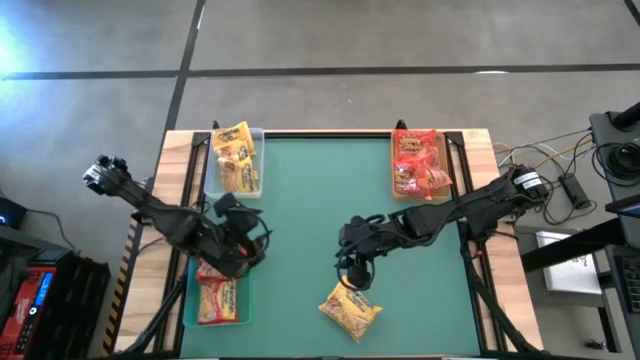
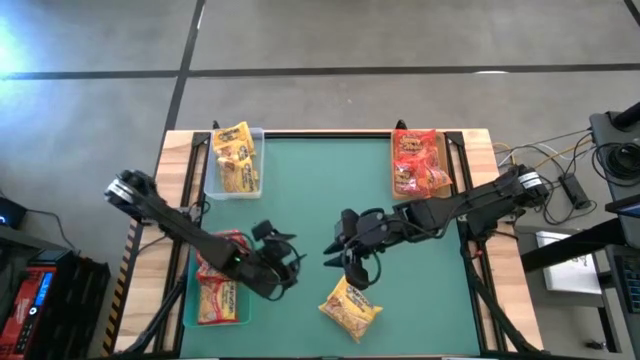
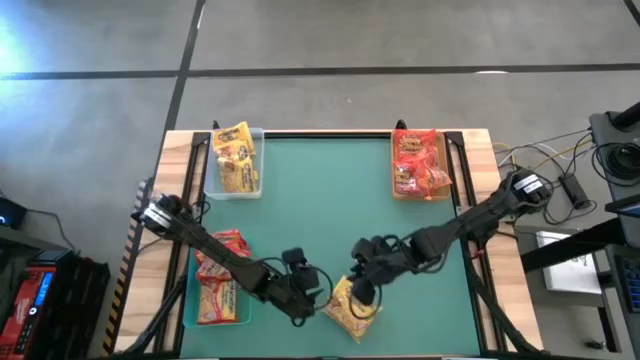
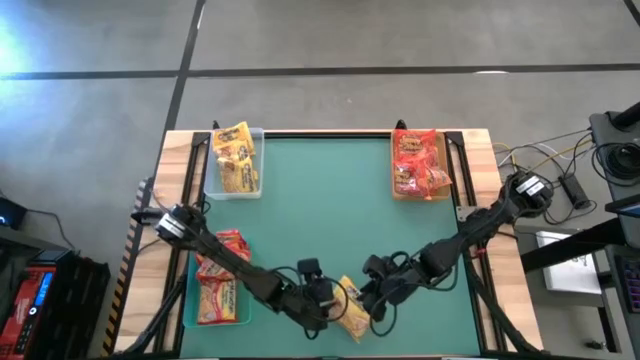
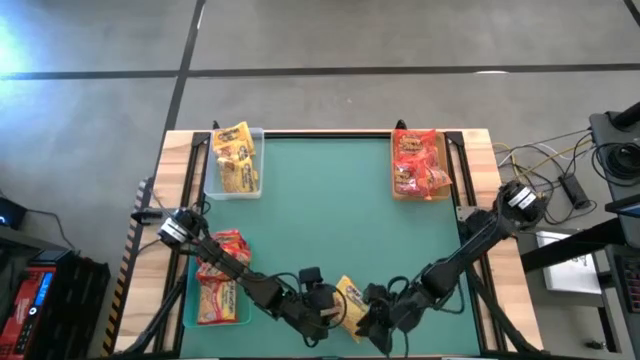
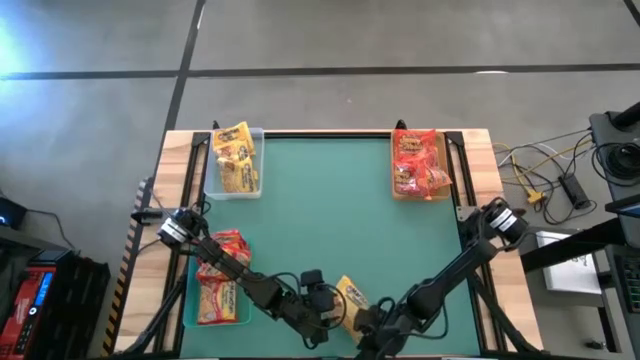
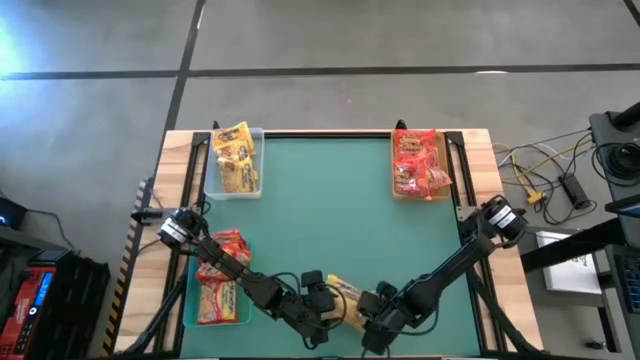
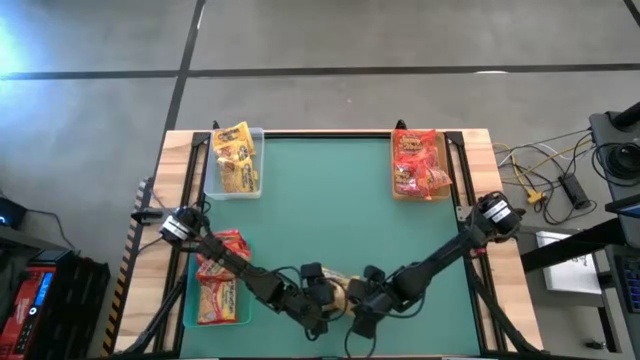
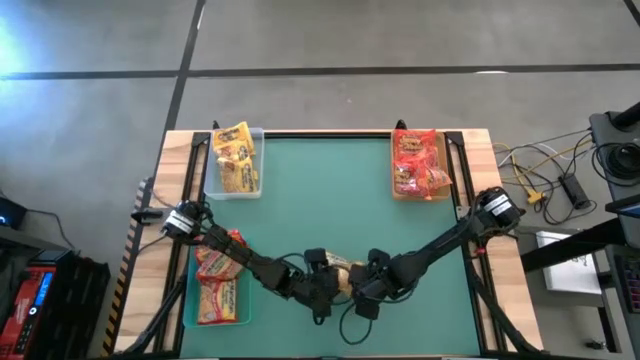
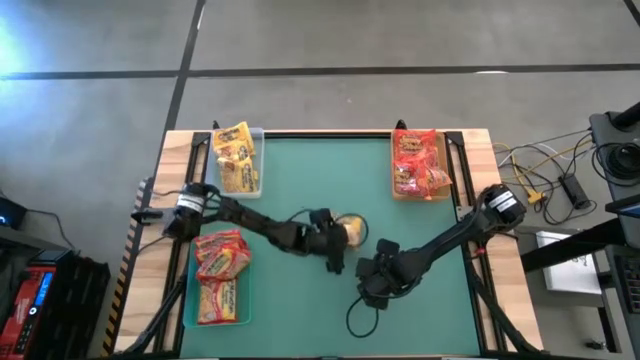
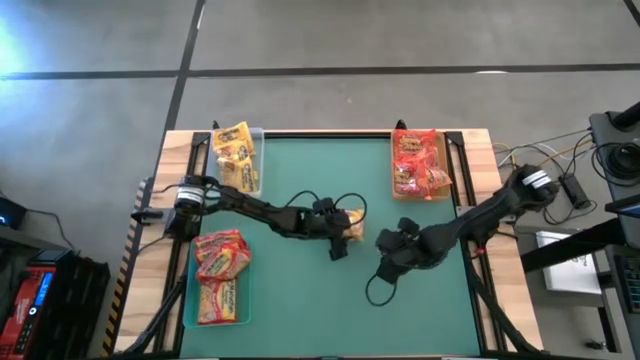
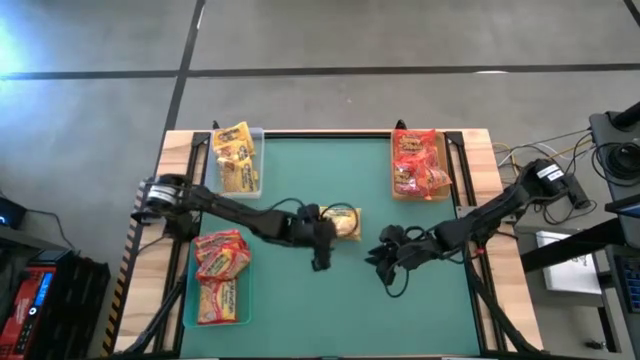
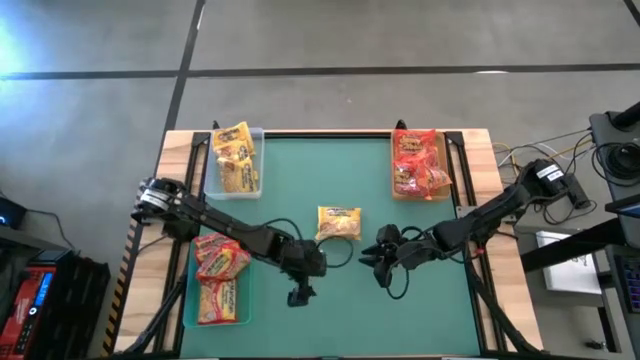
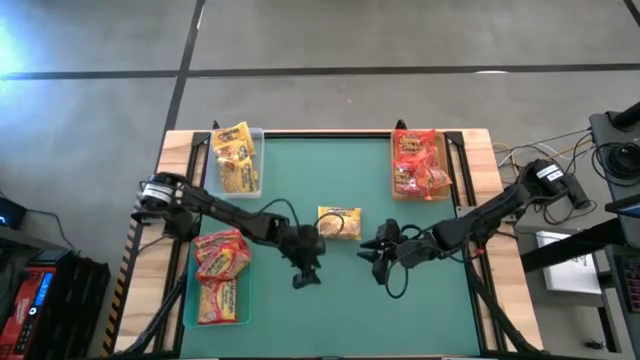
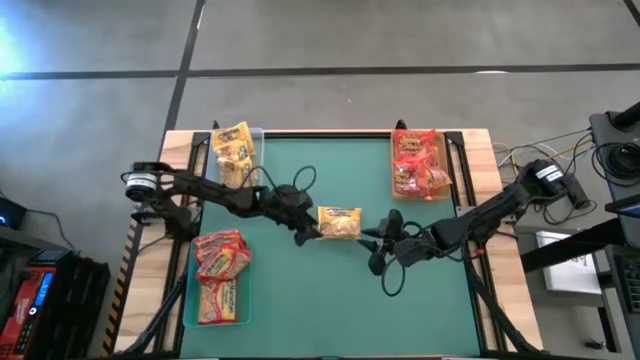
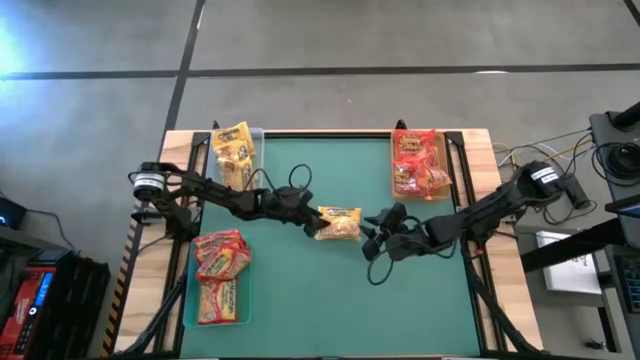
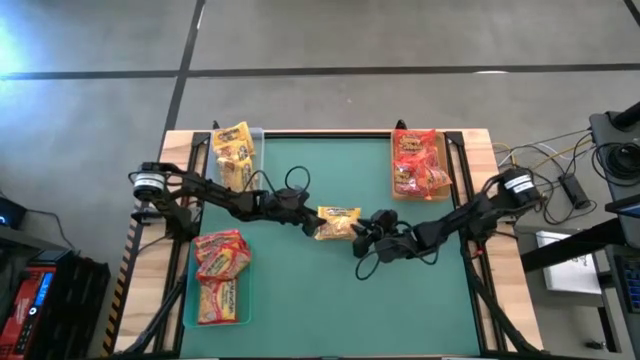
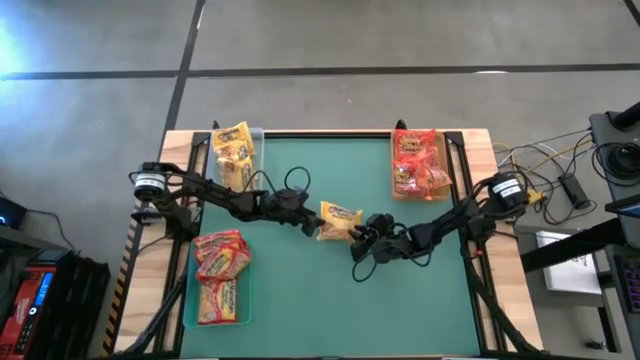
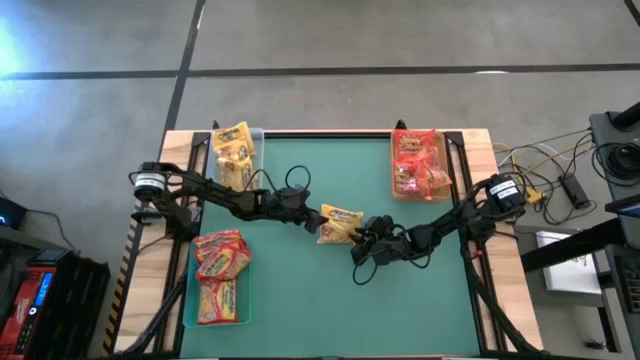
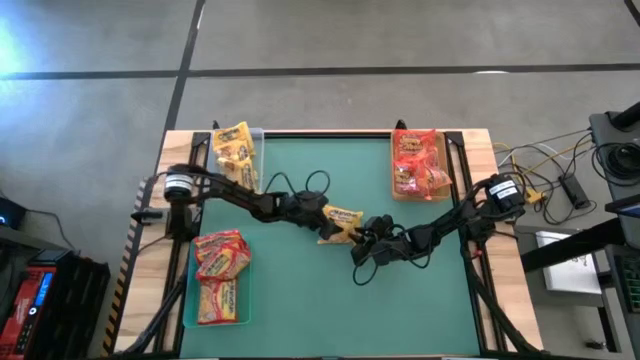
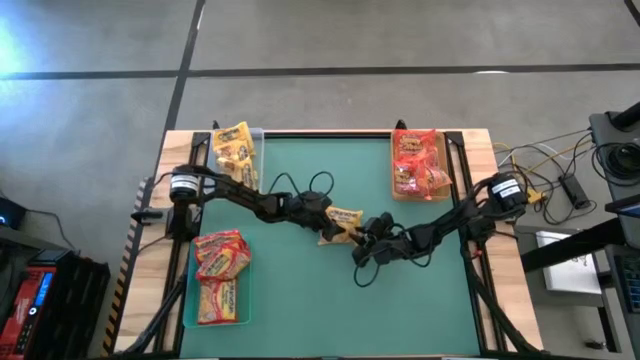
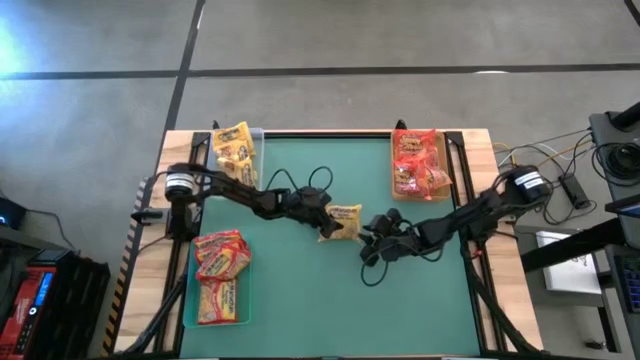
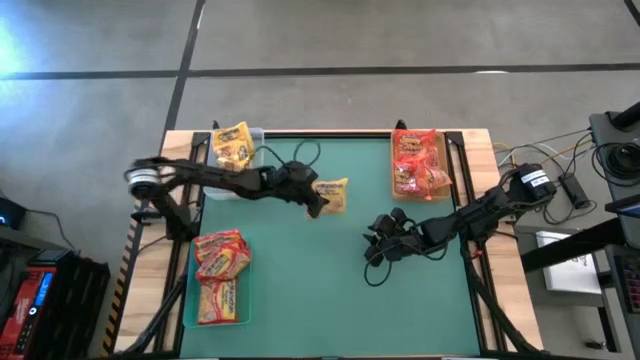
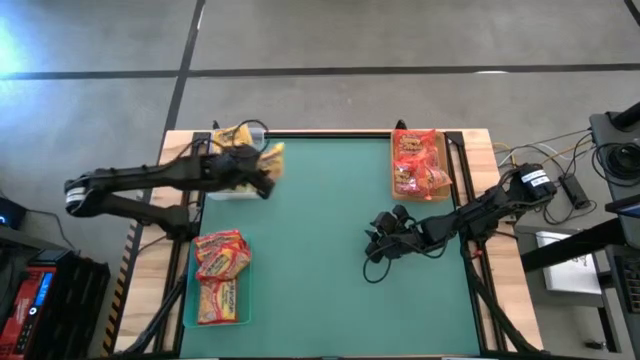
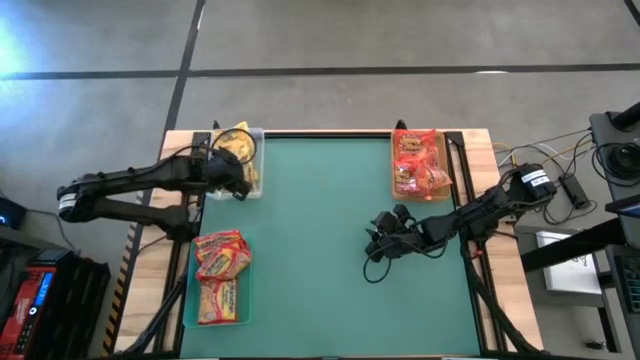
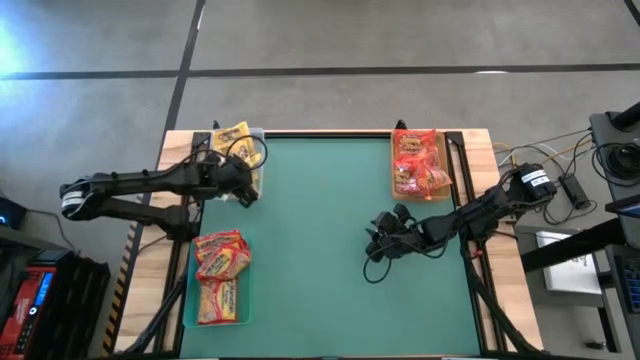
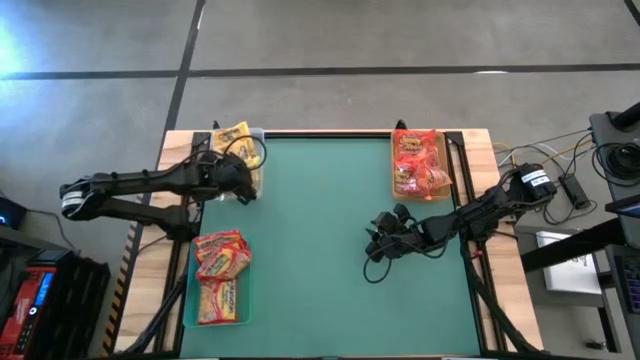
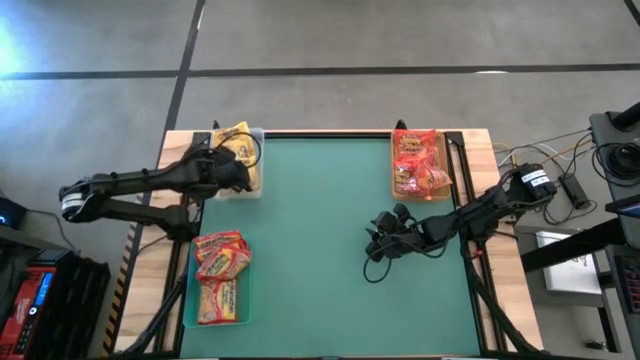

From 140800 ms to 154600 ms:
Task: Sort Maruchan noodles
Put the yellow noodle pack into the transparent bin

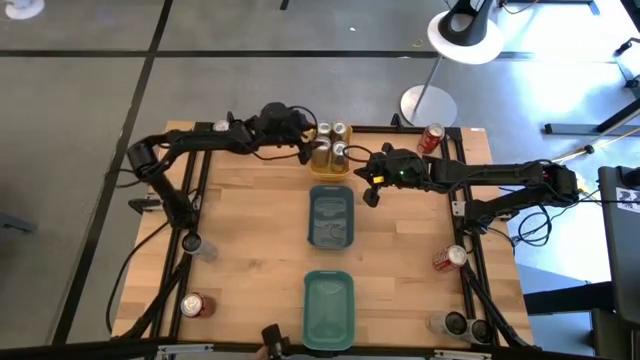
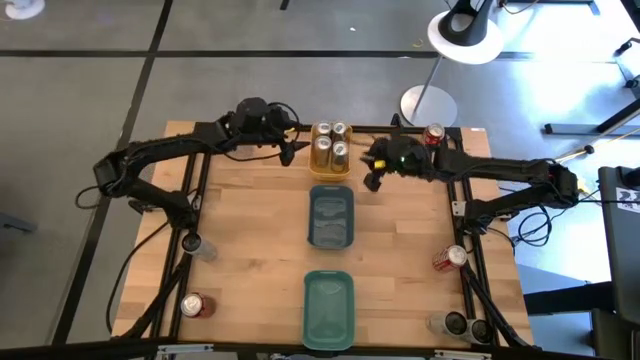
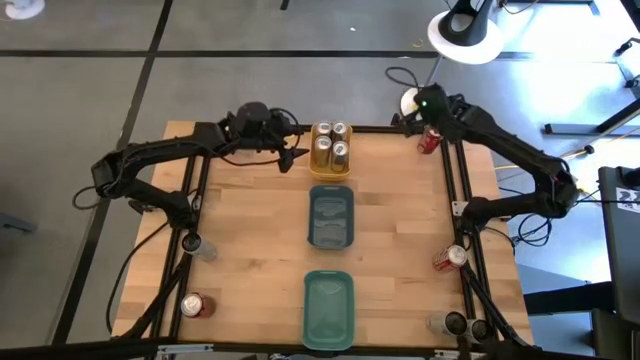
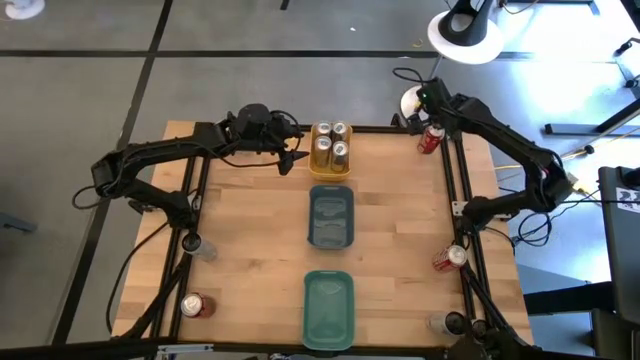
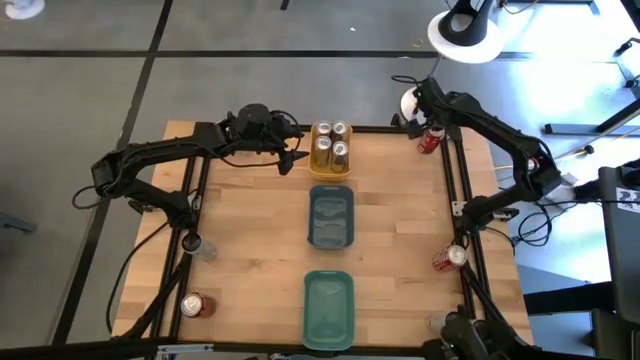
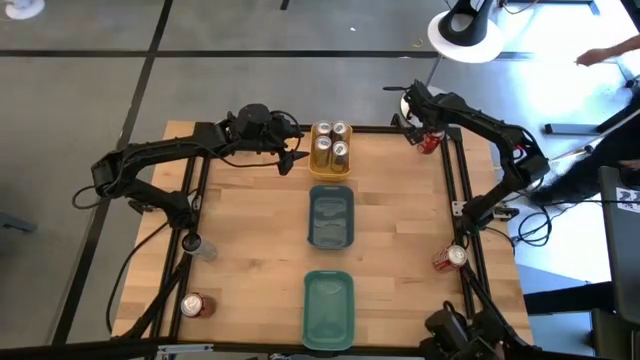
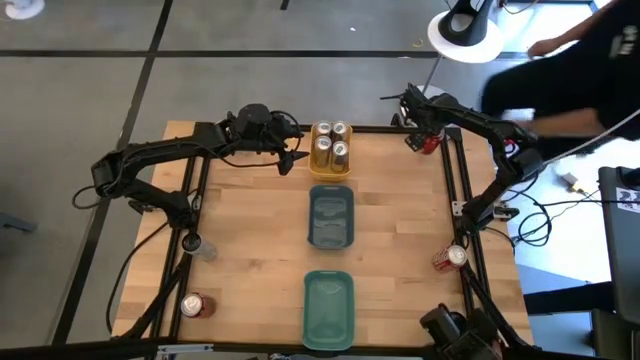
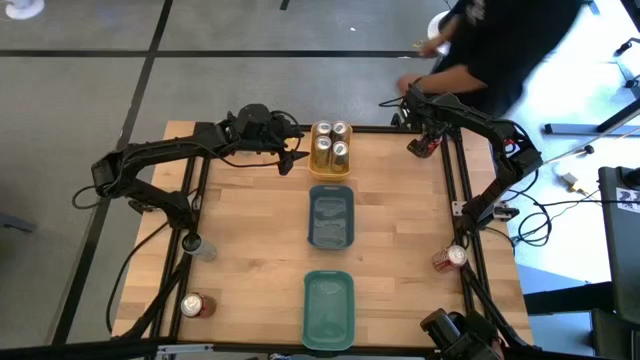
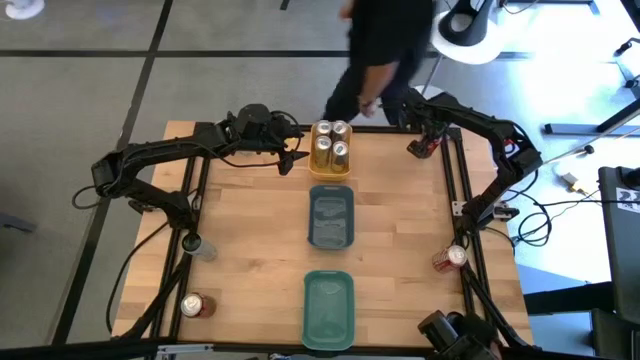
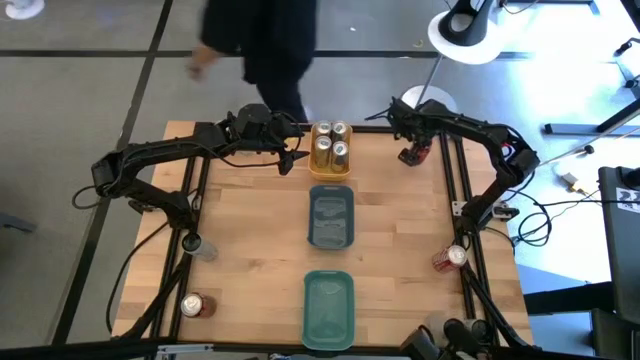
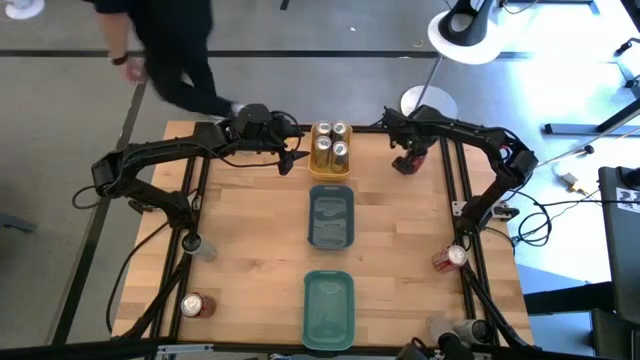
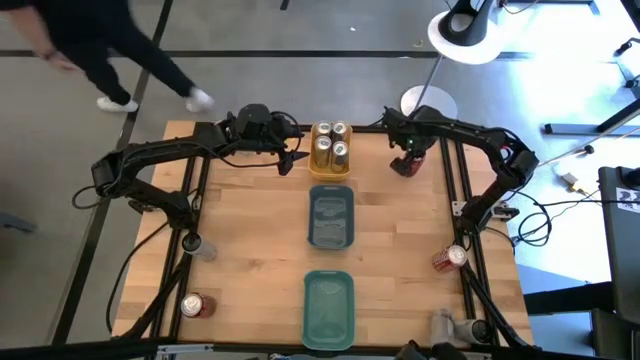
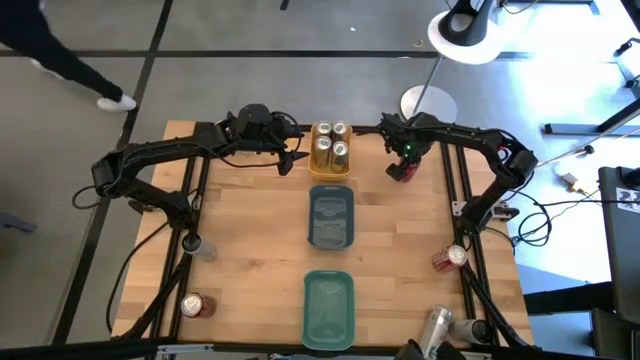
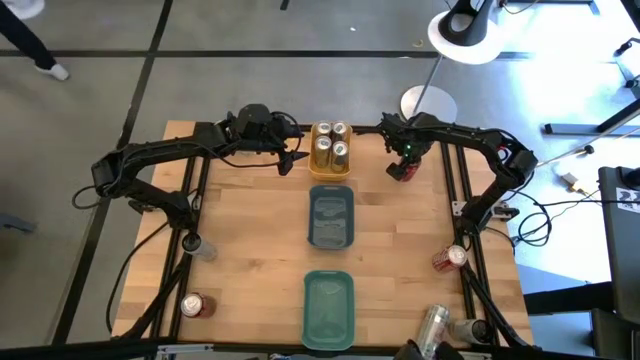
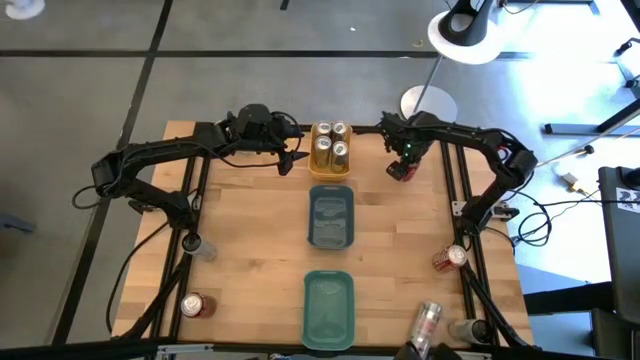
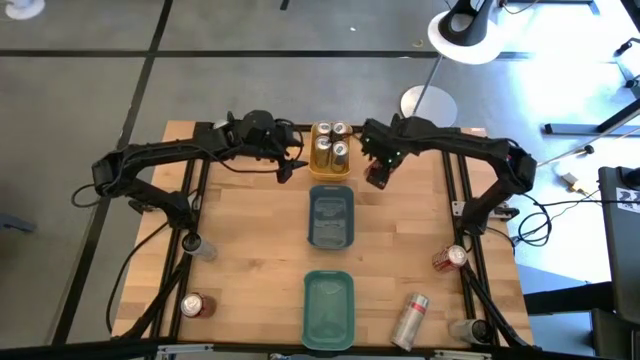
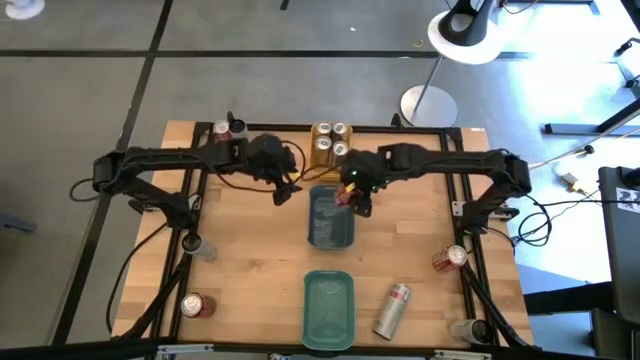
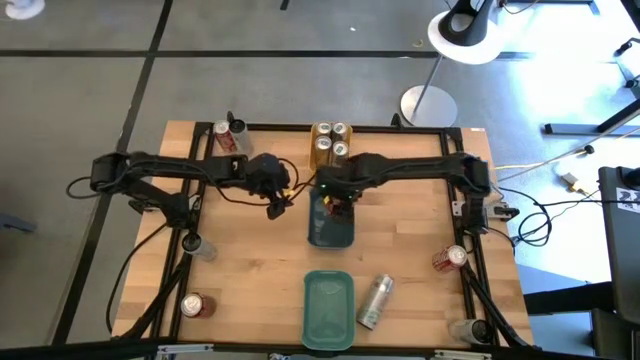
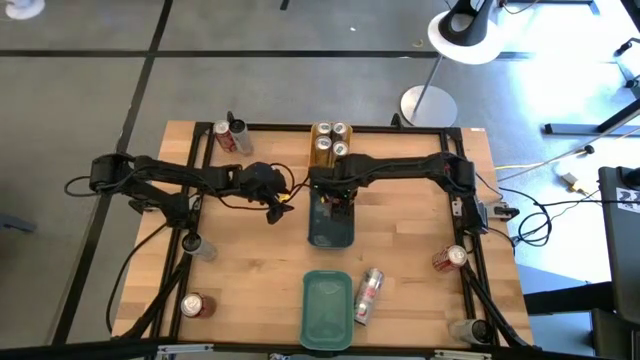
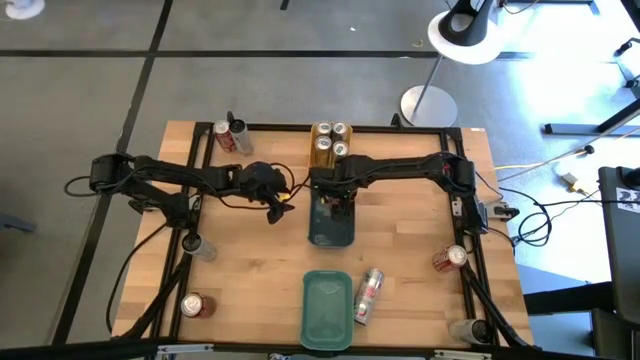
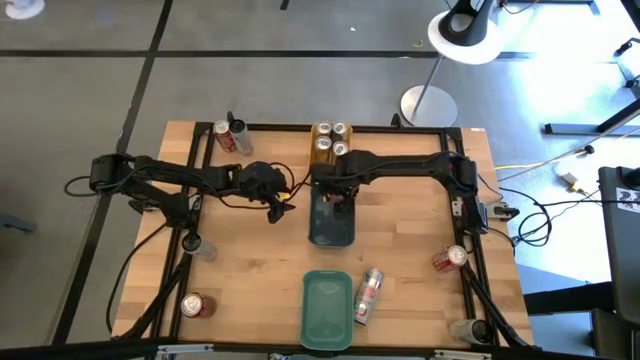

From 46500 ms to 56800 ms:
Task: Sort soda cans
Put the top right red, white soda can into the blue bin
